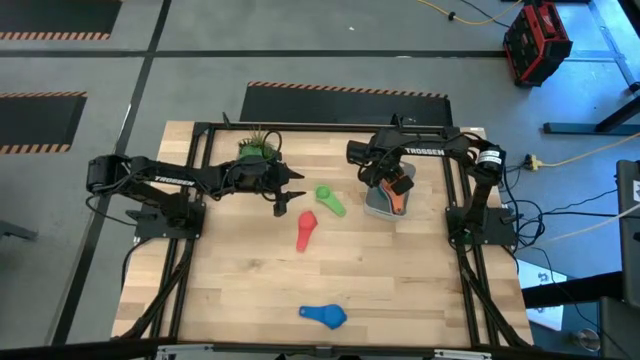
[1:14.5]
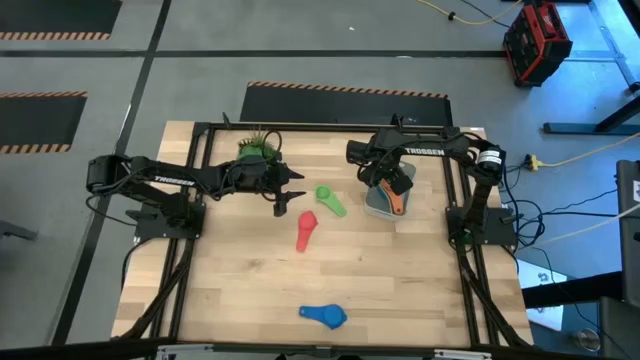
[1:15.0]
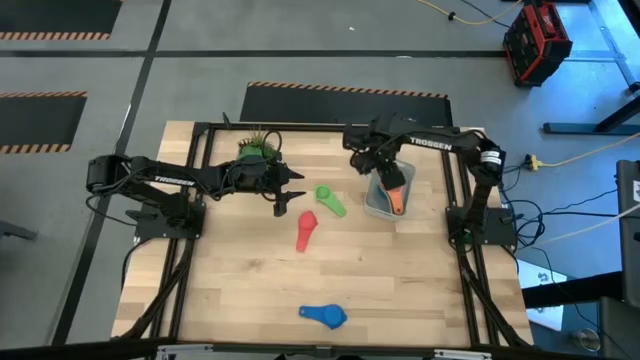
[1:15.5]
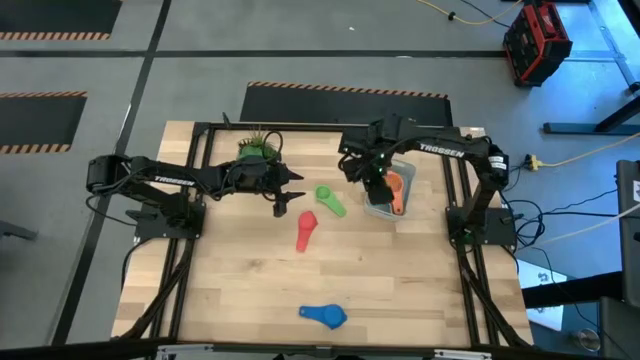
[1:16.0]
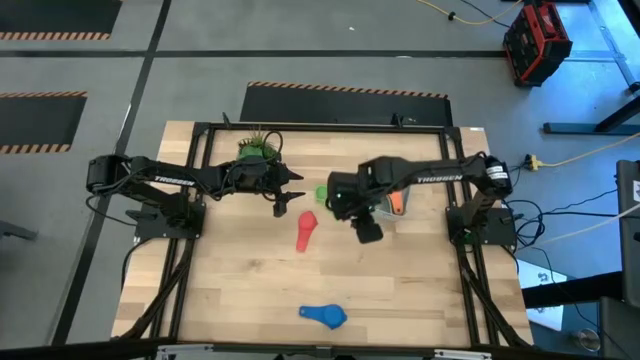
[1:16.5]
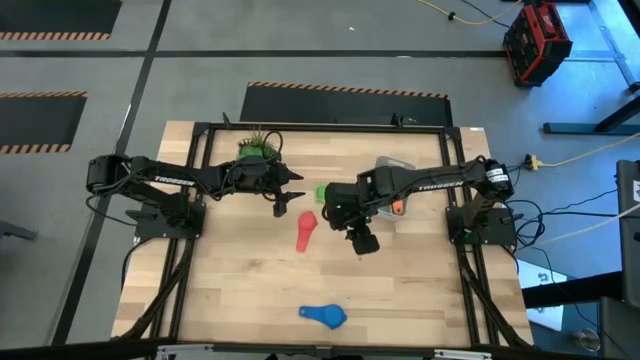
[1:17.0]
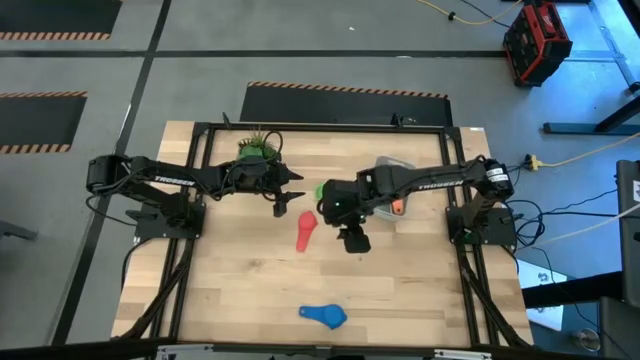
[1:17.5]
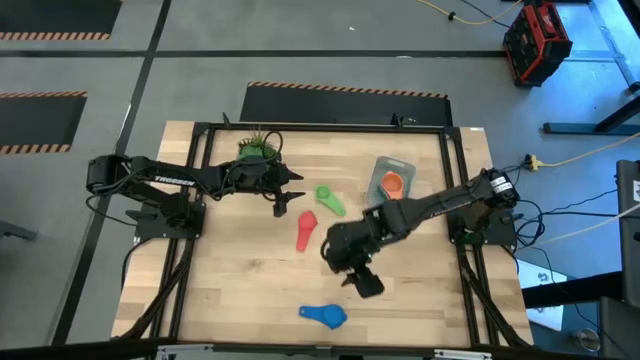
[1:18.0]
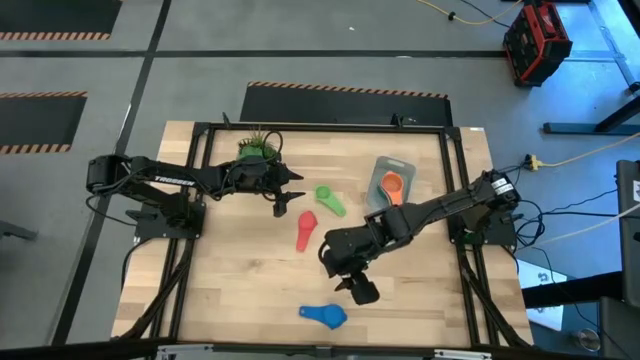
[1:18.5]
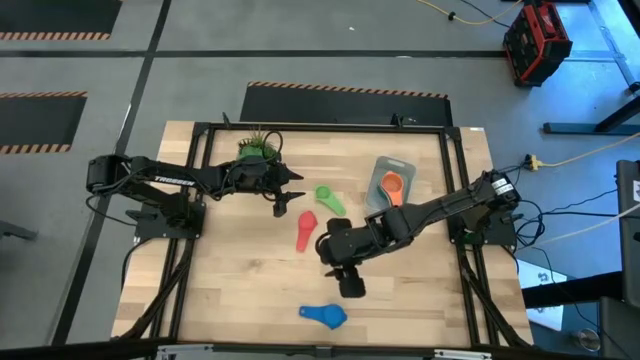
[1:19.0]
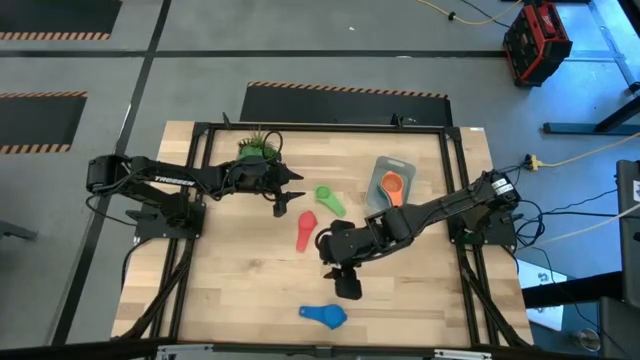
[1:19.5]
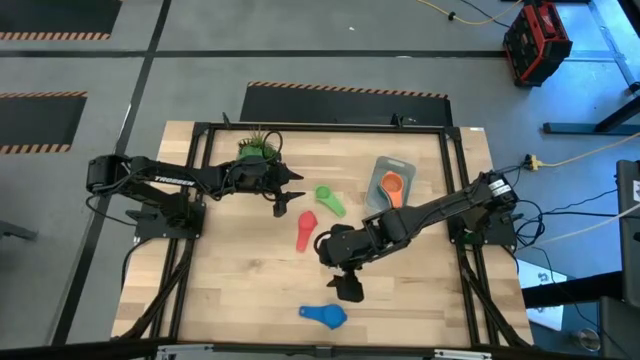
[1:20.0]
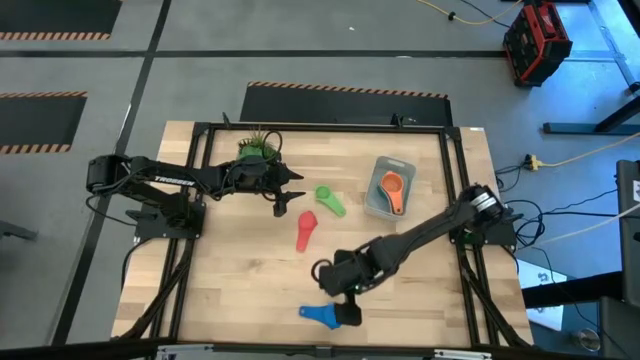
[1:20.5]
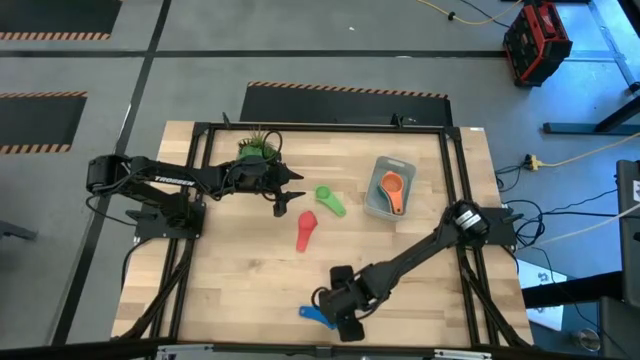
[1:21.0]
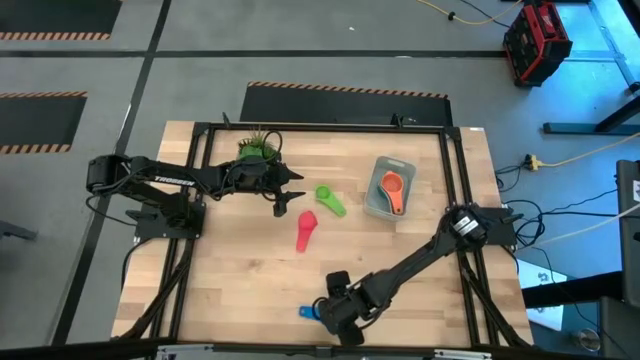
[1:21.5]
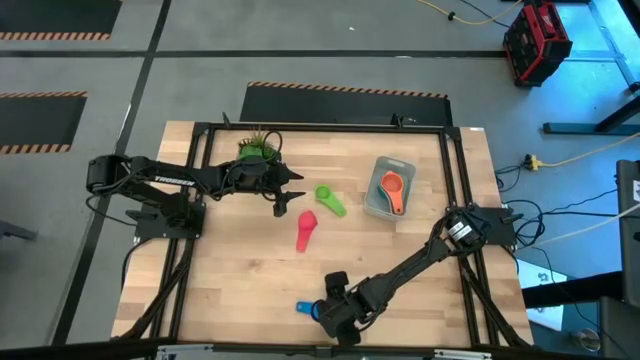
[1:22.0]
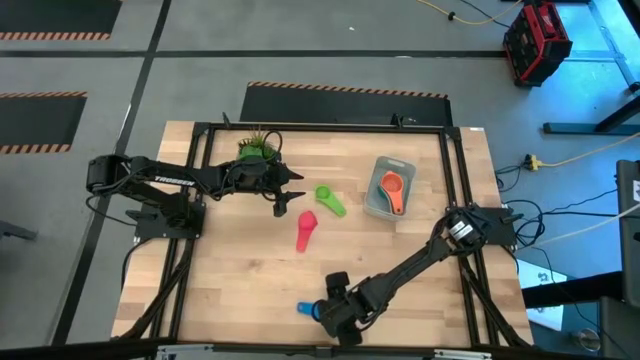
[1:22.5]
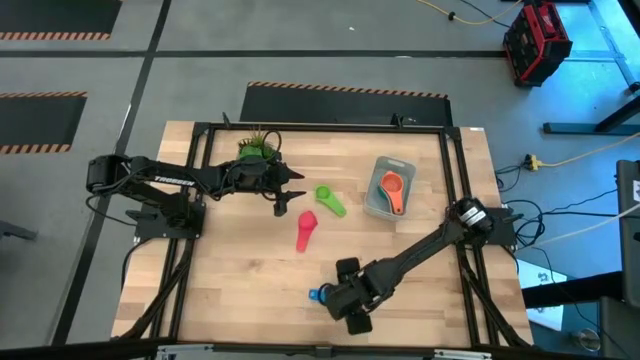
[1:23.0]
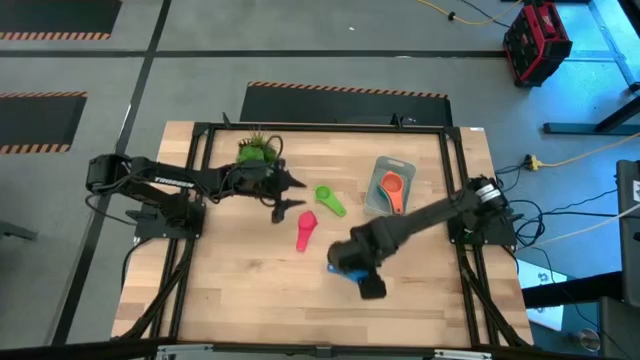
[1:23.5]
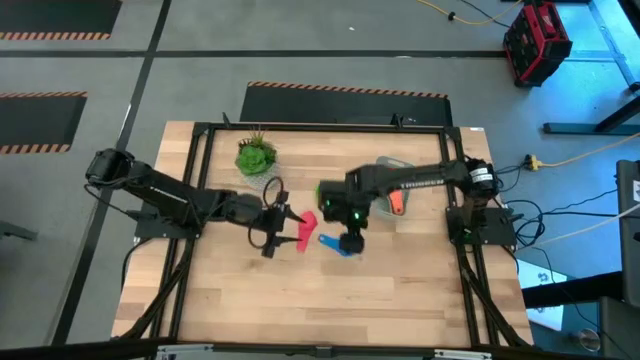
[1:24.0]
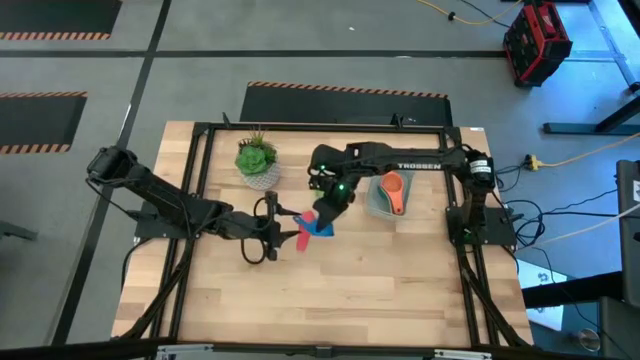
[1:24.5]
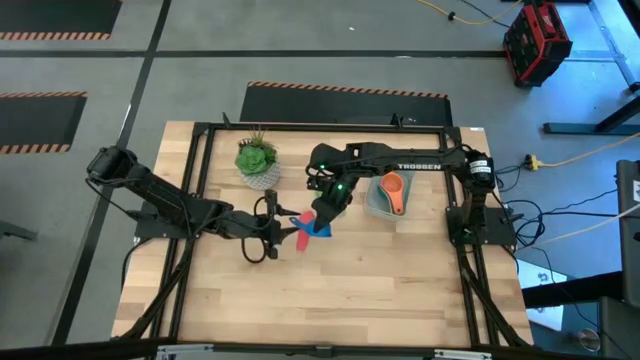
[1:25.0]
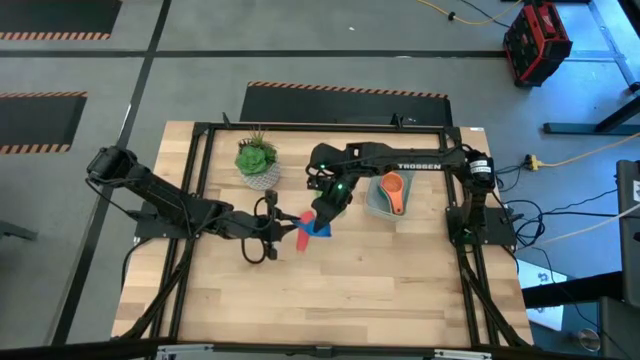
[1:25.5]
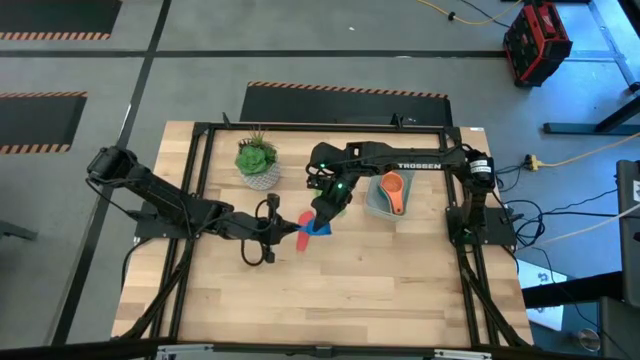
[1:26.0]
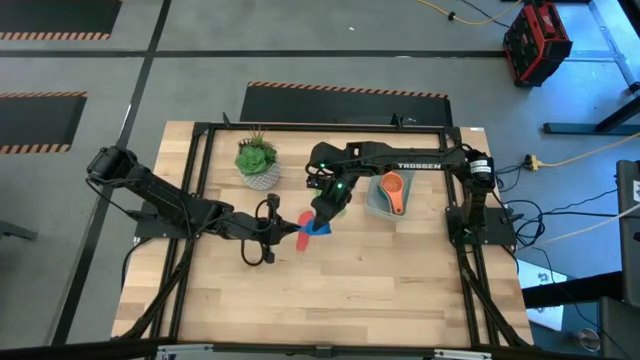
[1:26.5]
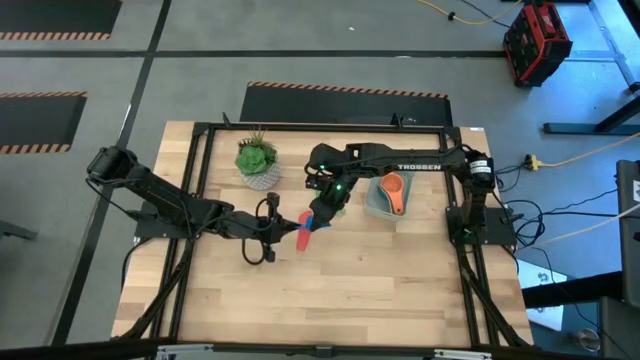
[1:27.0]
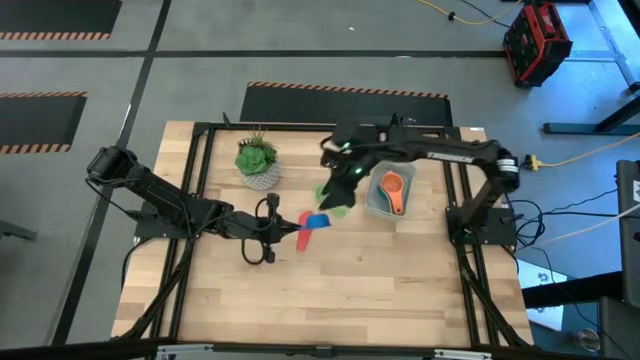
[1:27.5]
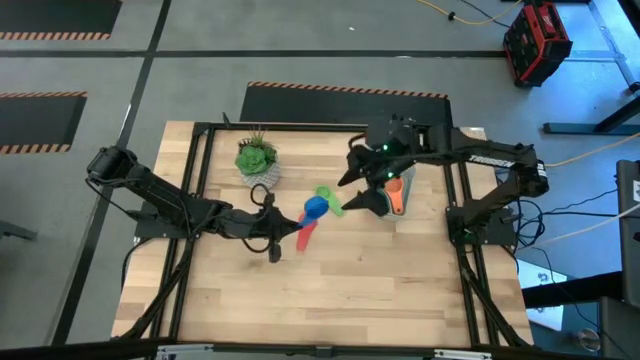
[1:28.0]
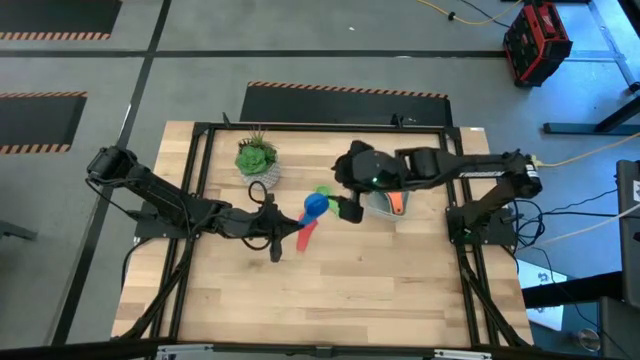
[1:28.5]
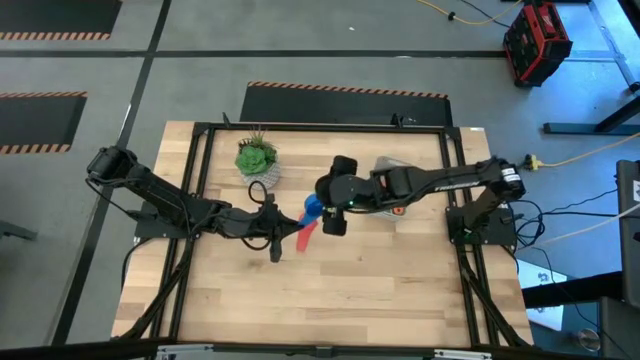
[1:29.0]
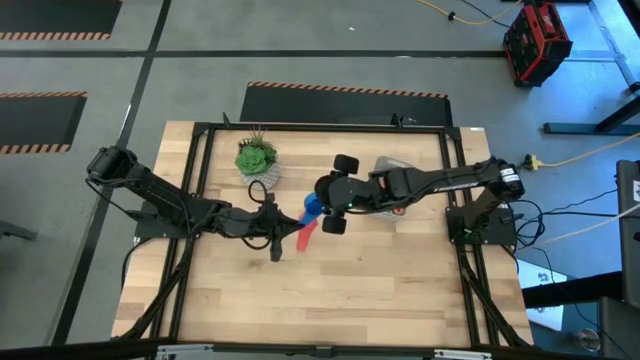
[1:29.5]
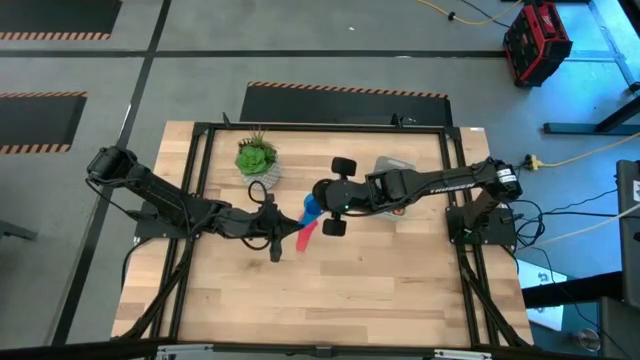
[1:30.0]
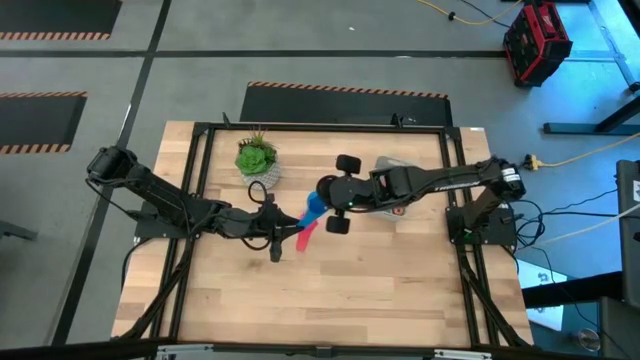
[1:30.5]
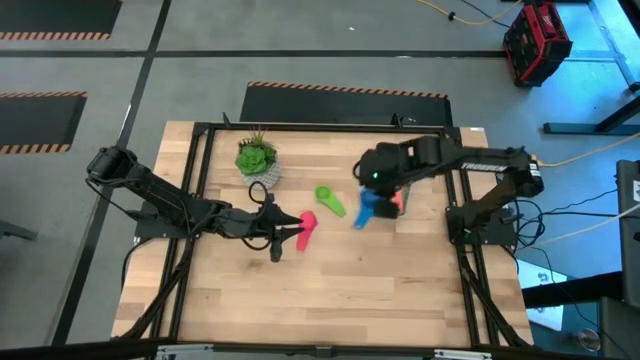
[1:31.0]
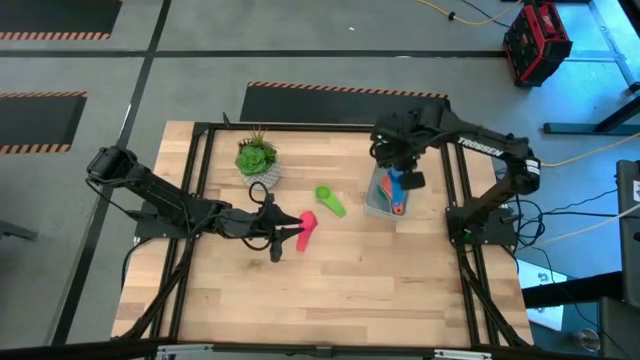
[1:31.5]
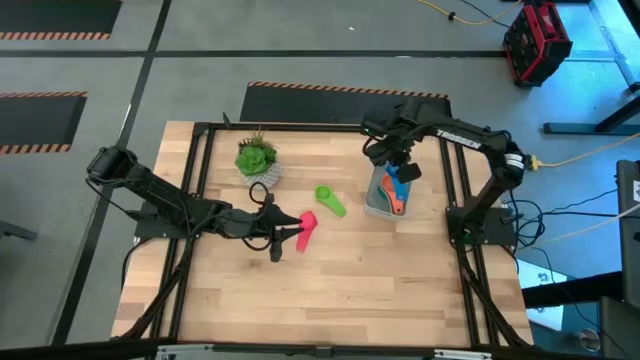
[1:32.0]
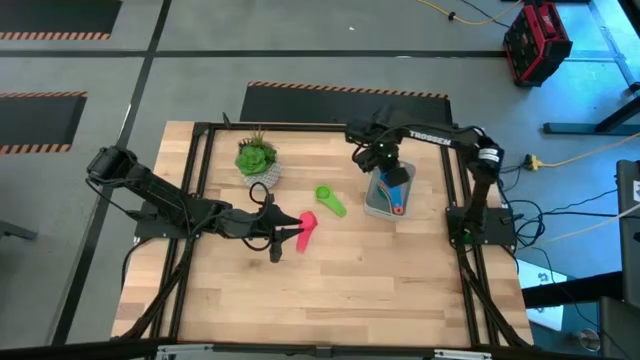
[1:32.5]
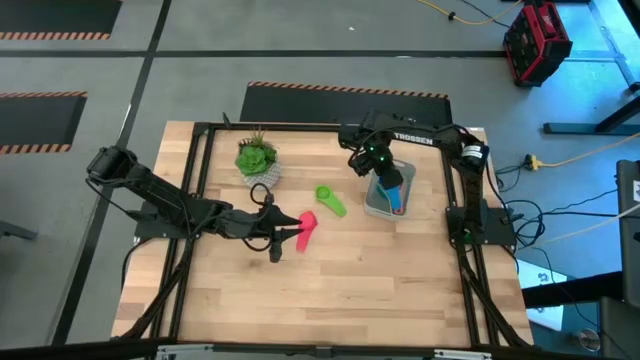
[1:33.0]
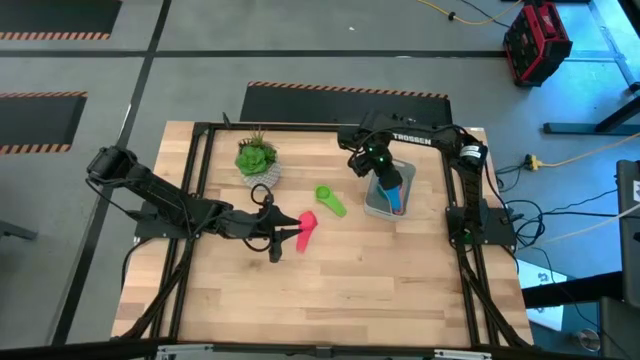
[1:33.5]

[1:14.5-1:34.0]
Task: Nest measuring cups in basket
Stack the blue measuring cup on top of the orange measuring cup in the gray bin

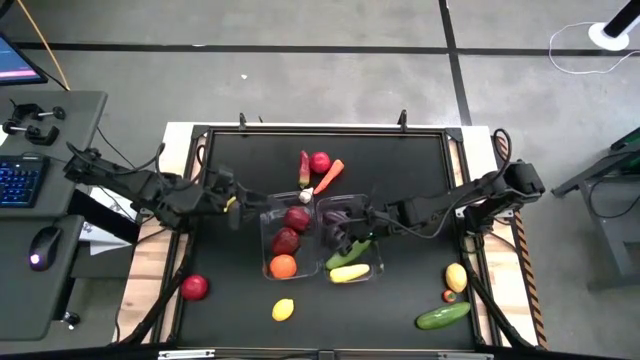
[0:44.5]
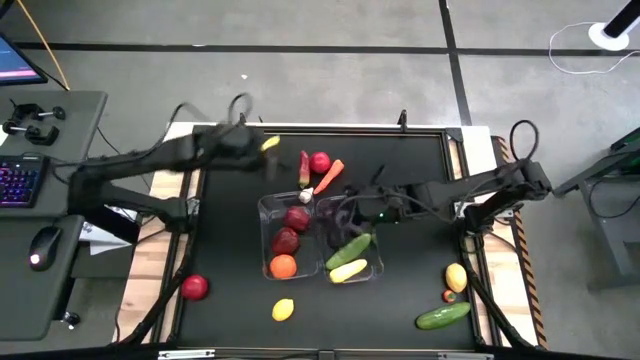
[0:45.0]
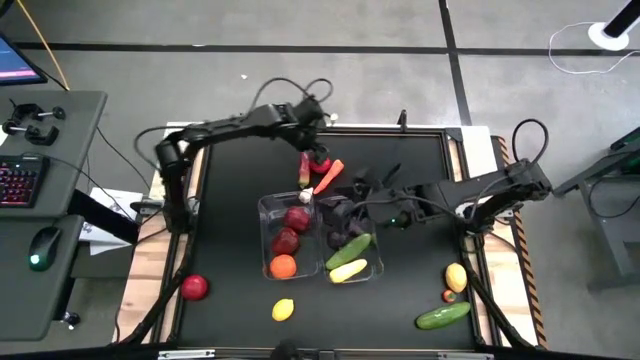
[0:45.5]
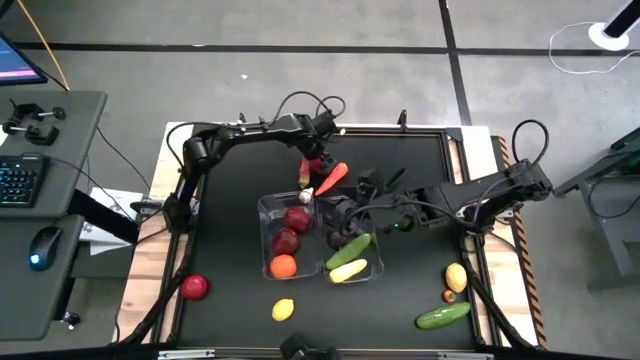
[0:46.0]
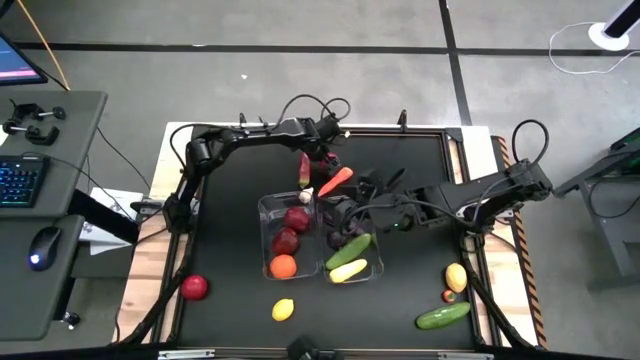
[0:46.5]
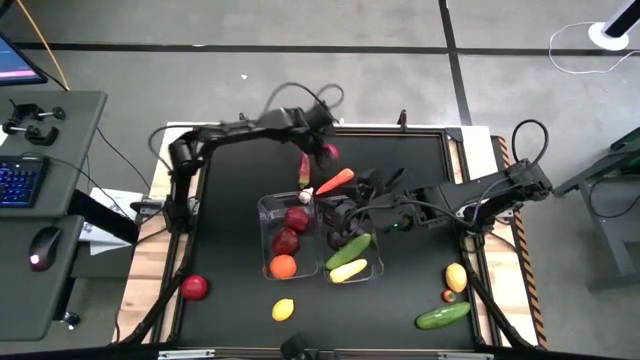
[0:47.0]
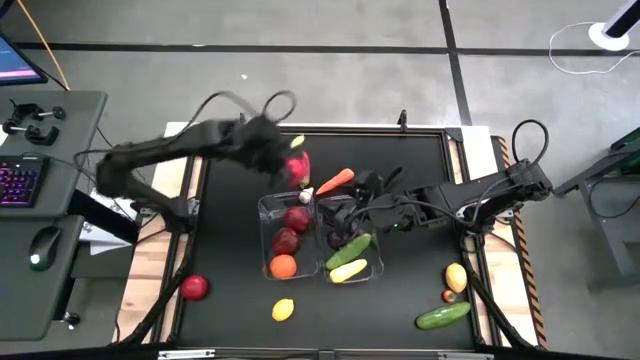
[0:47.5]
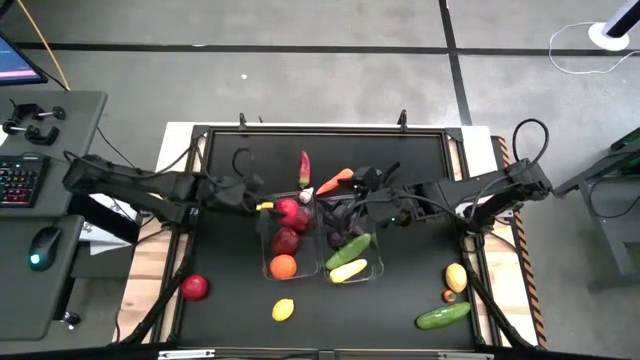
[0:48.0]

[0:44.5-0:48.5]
Task: Sort produce into baskets
Put the top tomato into the left transparent bin
